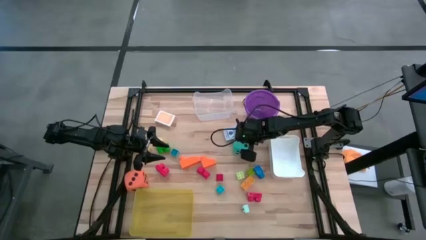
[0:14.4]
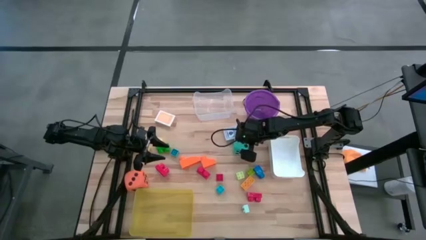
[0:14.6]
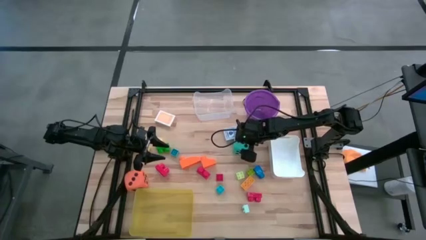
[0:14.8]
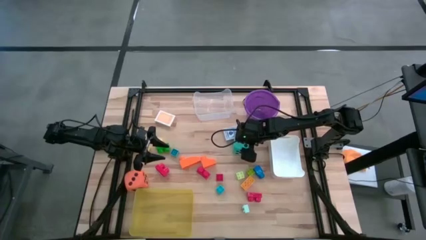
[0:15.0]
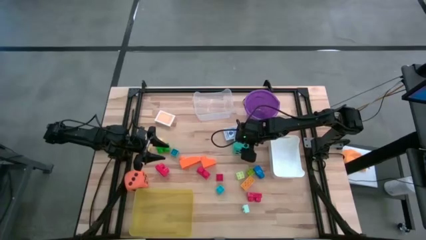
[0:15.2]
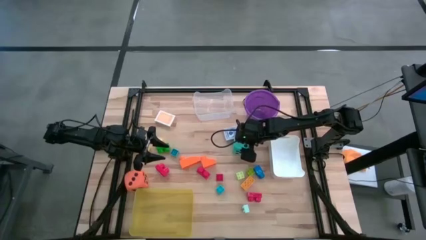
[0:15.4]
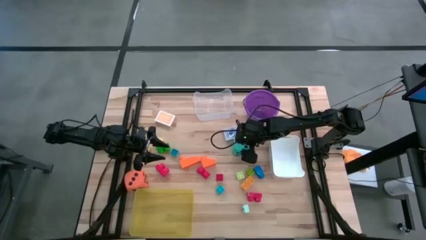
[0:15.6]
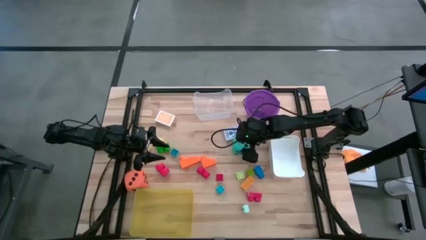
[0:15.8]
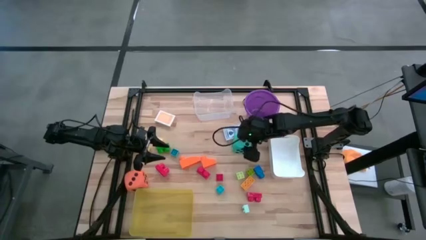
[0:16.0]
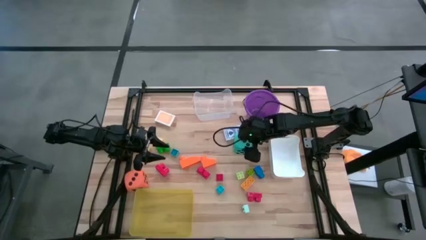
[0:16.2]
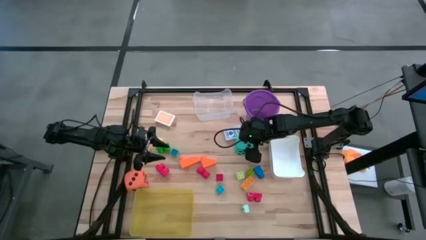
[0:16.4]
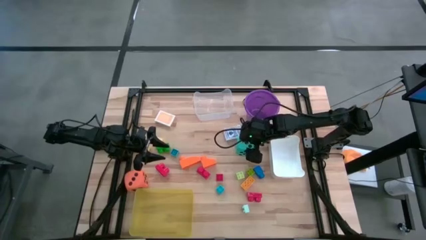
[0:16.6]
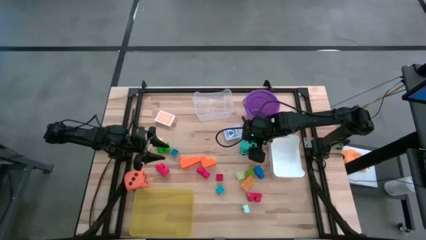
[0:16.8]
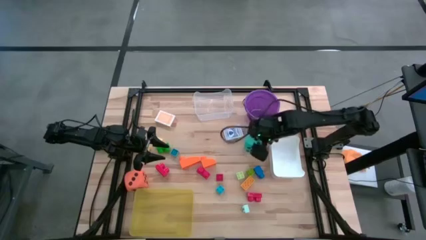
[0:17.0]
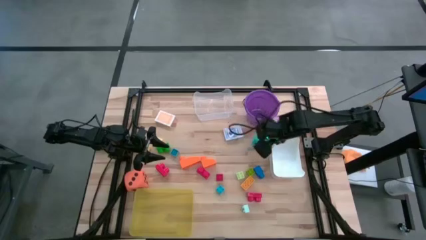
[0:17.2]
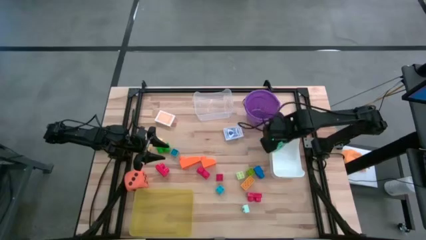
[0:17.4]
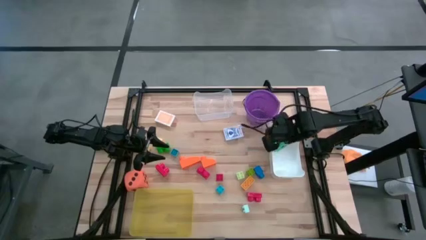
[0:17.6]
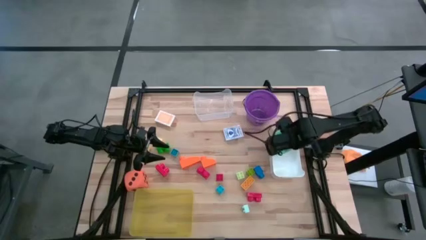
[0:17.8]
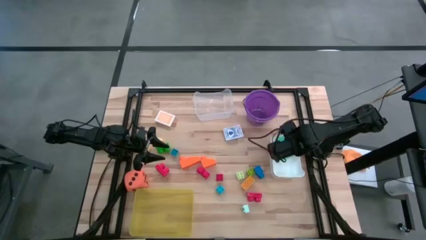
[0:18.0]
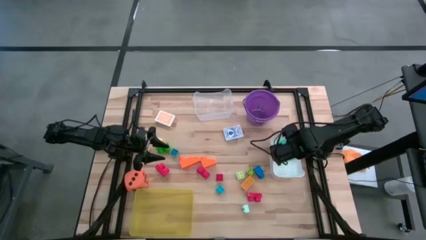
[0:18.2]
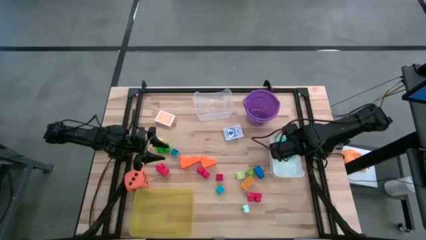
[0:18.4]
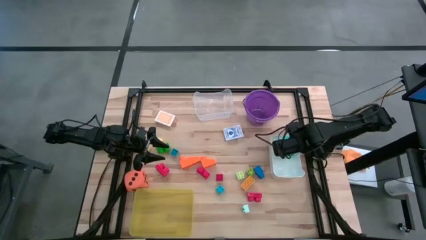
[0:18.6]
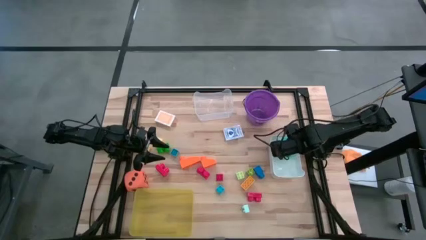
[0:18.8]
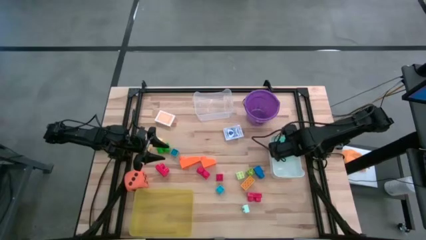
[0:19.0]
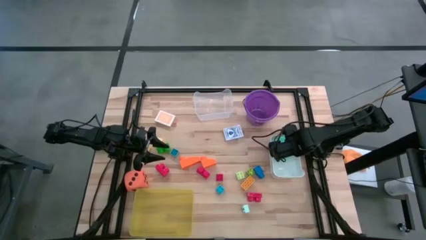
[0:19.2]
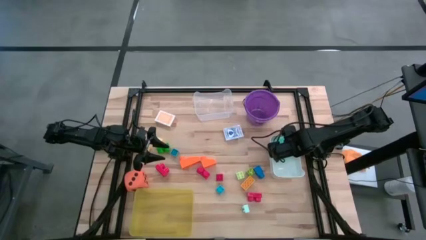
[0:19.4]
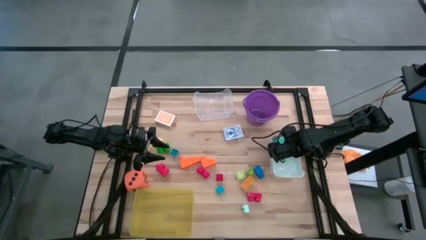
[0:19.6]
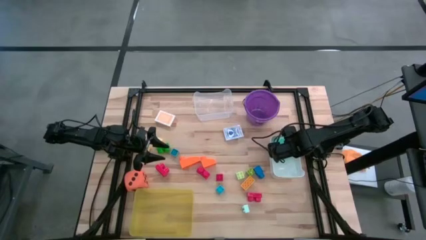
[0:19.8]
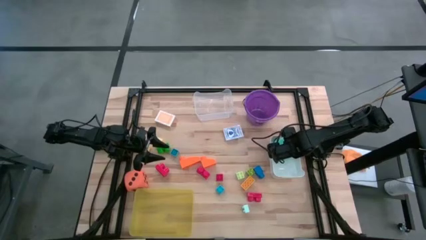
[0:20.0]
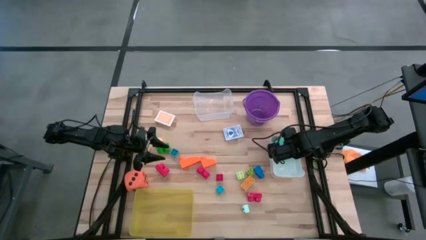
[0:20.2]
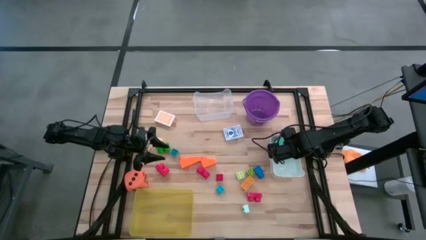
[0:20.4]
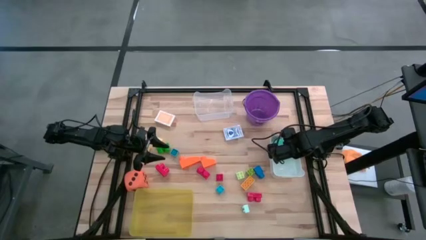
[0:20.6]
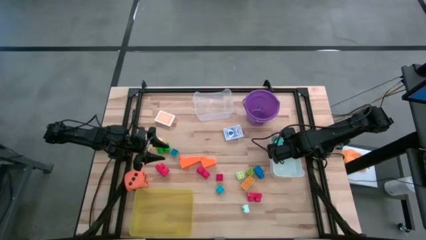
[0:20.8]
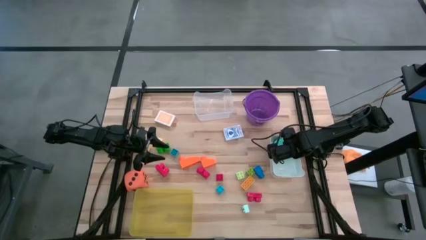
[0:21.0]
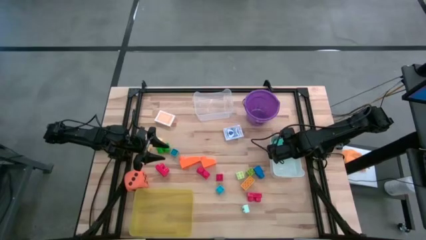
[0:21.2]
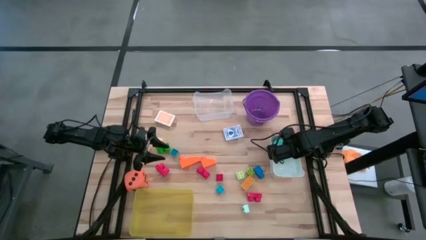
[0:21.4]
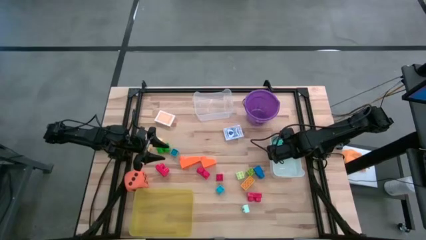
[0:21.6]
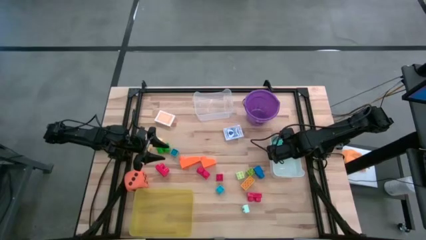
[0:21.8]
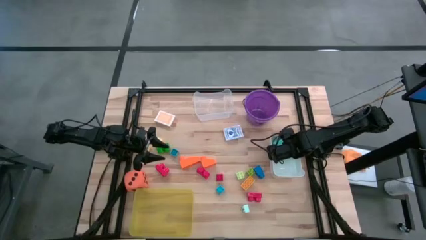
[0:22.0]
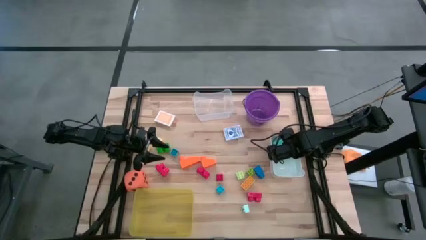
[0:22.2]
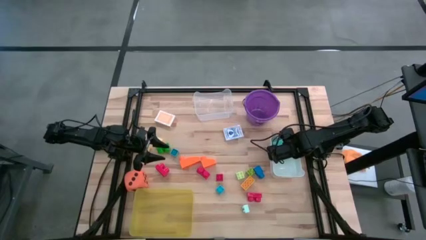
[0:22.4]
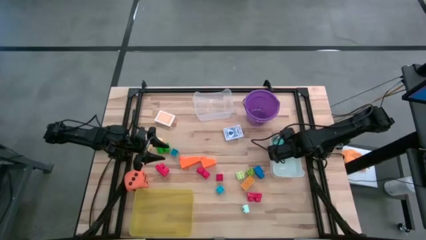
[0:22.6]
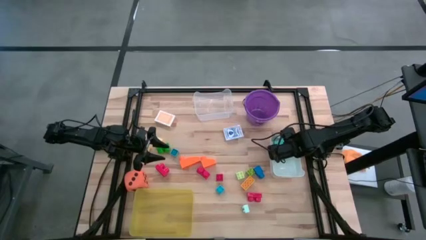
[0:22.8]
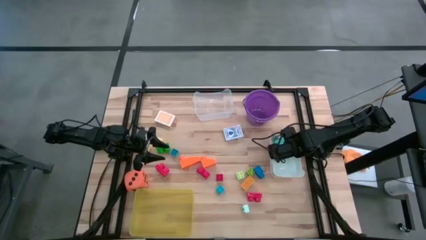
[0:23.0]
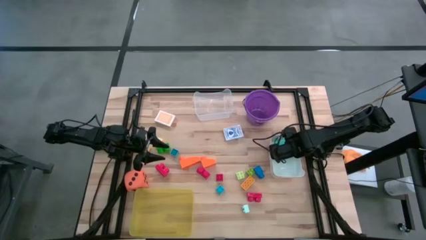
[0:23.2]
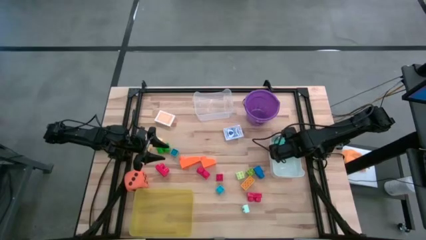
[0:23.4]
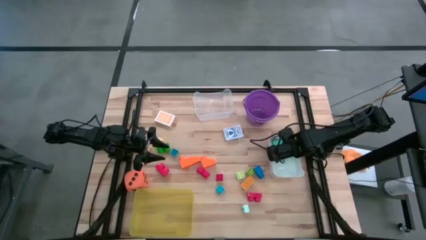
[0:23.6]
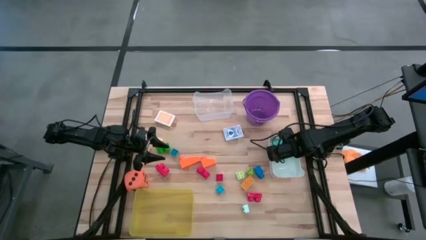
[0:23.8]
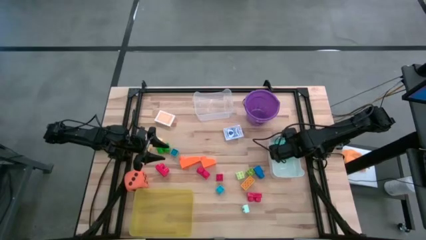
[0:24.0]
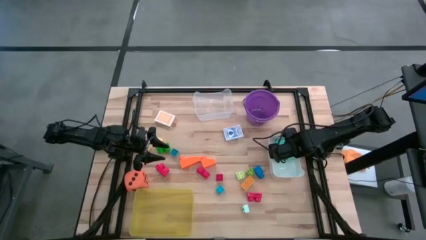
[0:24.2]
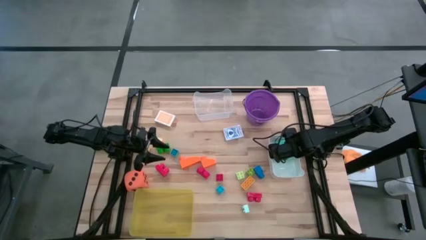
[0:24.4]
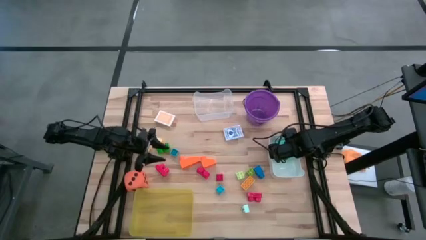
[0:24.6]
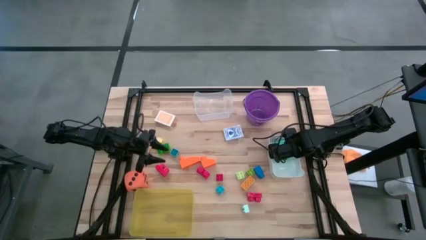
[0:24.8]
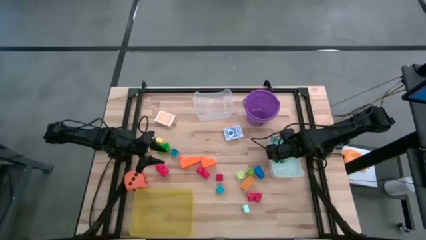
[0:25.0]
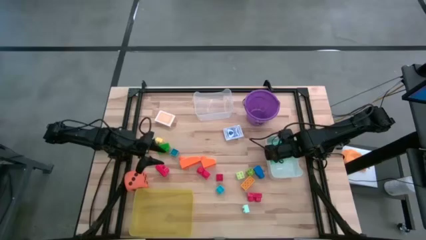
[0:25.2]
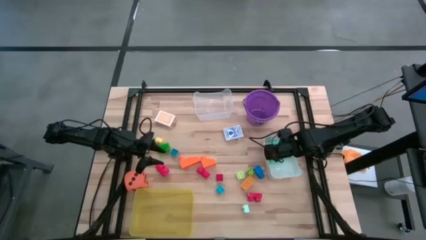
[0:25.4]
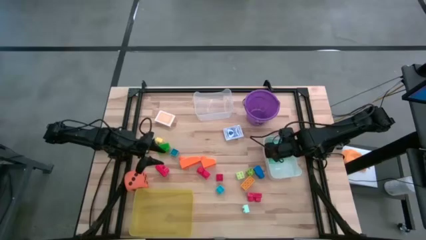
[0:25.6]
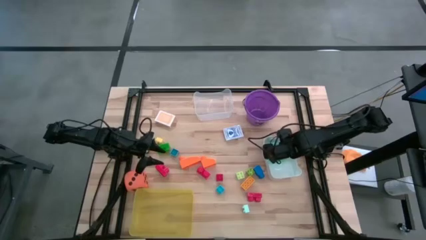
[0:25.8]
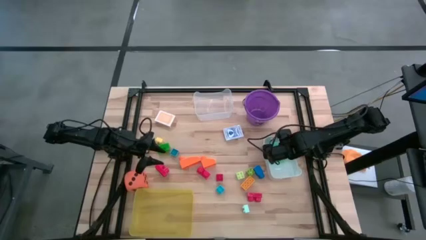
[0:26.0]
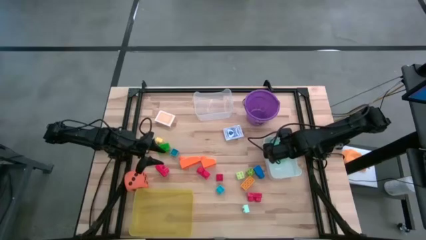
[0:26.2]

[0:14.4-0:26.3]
Task: Pick & Place Toys
Put the light blue dice into the white bin
